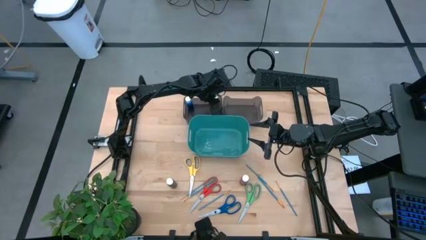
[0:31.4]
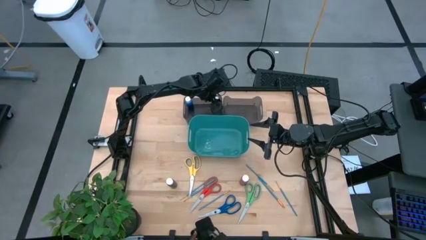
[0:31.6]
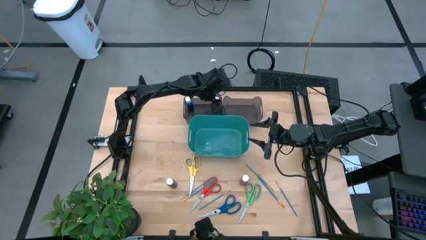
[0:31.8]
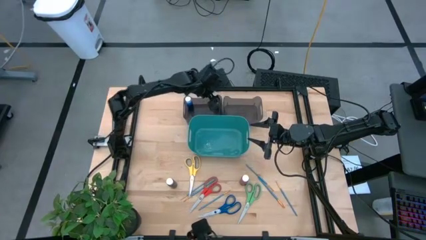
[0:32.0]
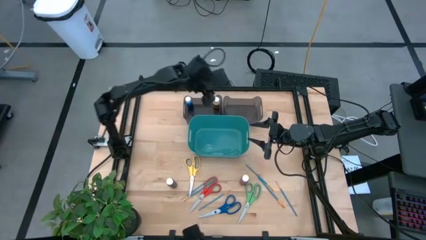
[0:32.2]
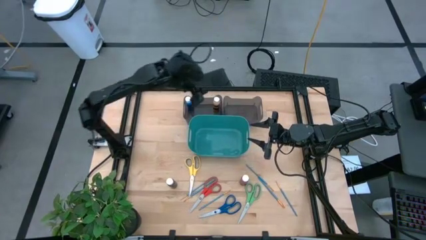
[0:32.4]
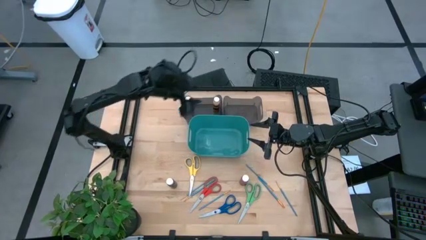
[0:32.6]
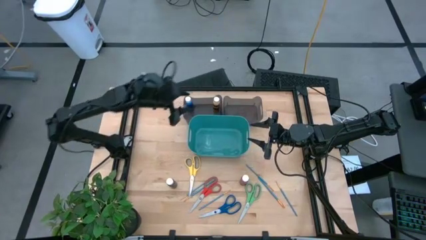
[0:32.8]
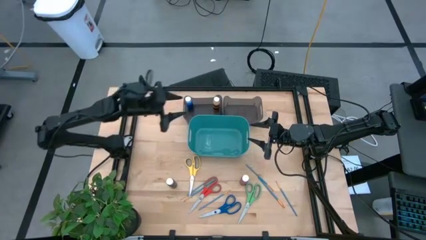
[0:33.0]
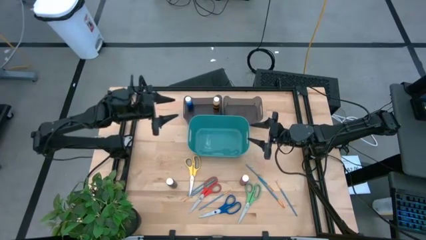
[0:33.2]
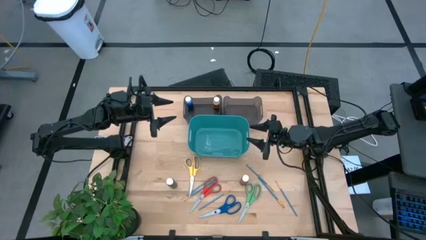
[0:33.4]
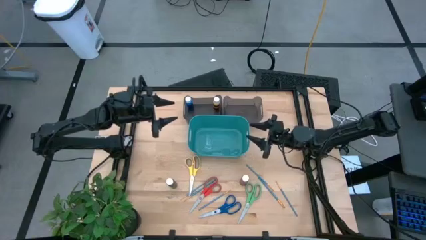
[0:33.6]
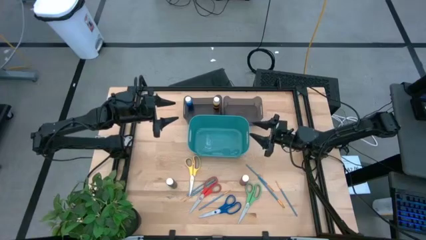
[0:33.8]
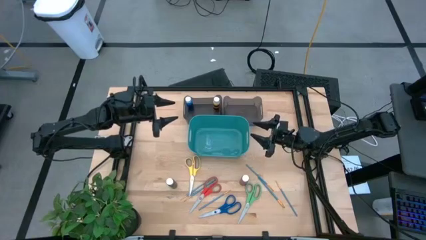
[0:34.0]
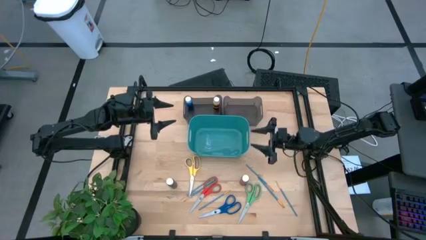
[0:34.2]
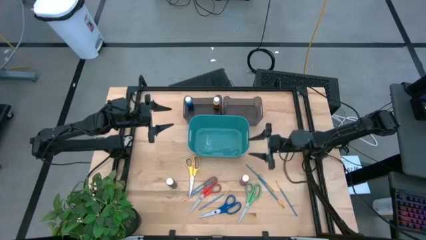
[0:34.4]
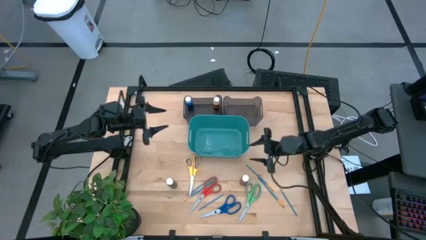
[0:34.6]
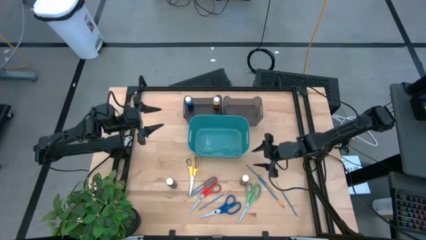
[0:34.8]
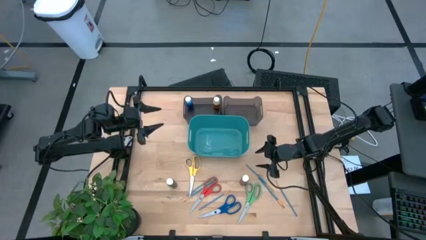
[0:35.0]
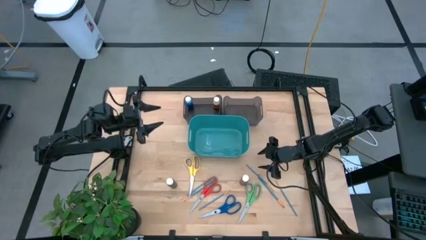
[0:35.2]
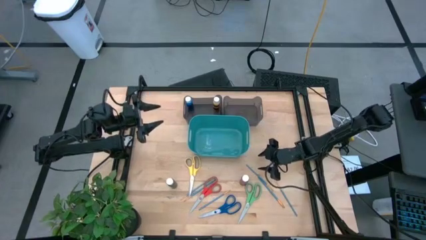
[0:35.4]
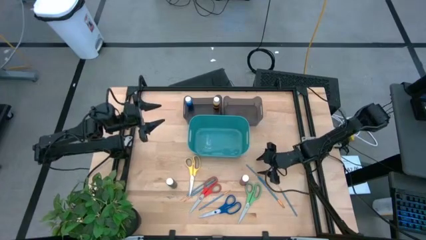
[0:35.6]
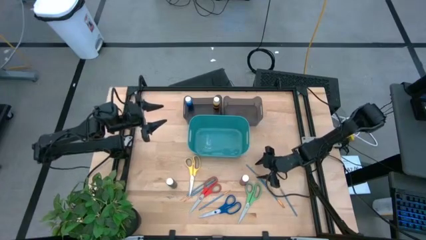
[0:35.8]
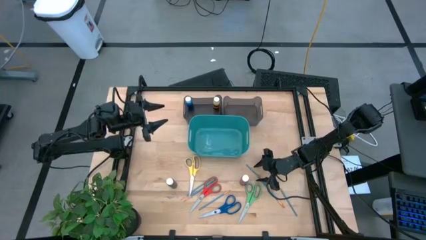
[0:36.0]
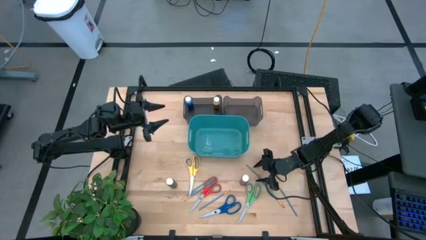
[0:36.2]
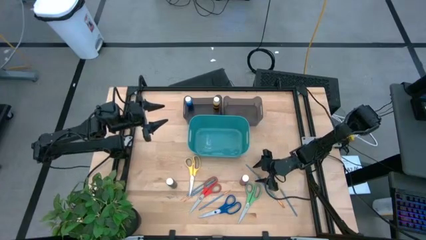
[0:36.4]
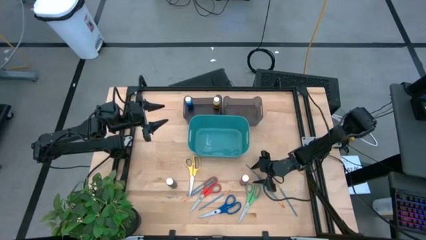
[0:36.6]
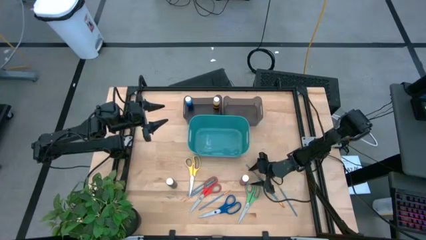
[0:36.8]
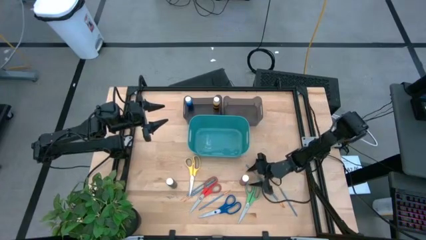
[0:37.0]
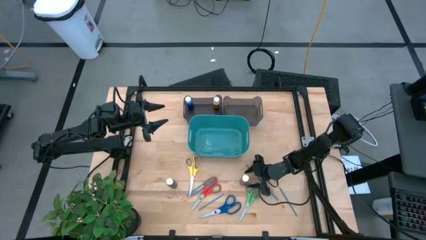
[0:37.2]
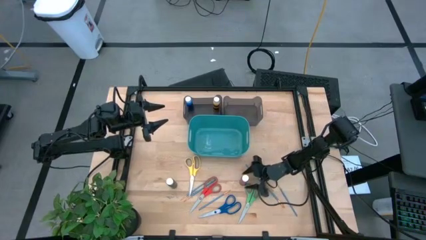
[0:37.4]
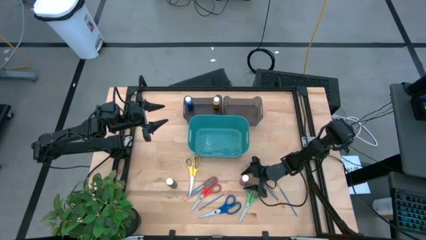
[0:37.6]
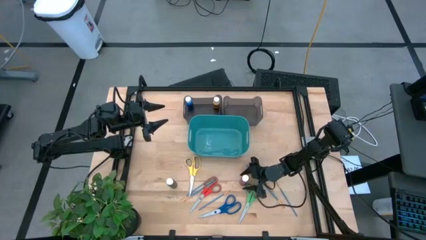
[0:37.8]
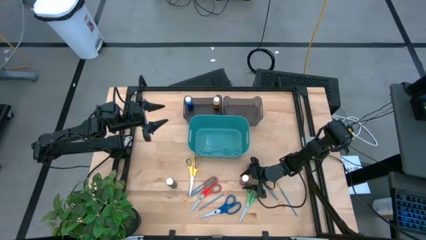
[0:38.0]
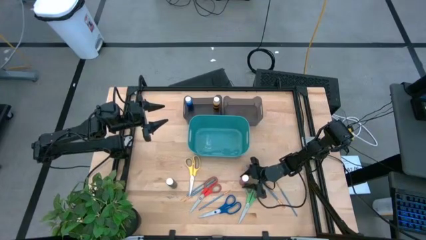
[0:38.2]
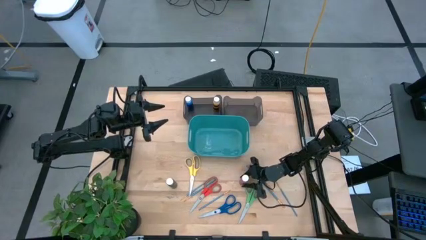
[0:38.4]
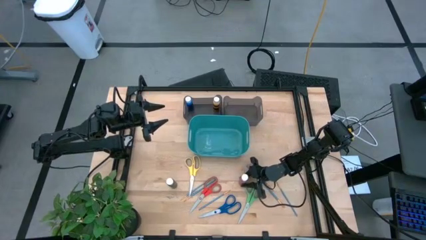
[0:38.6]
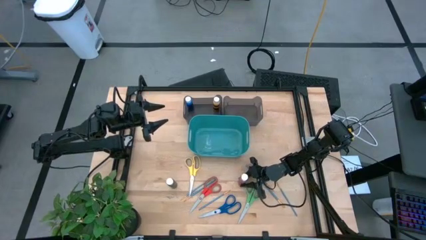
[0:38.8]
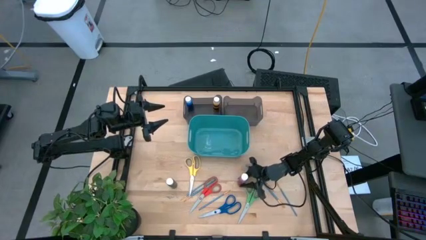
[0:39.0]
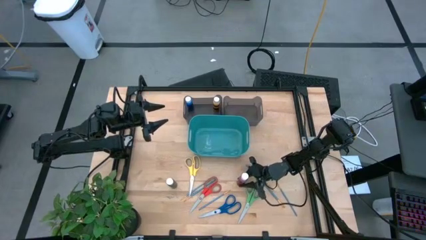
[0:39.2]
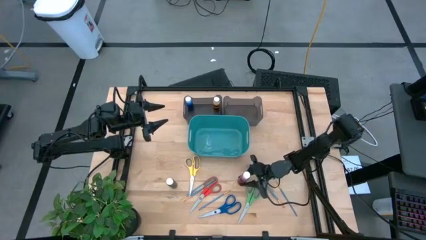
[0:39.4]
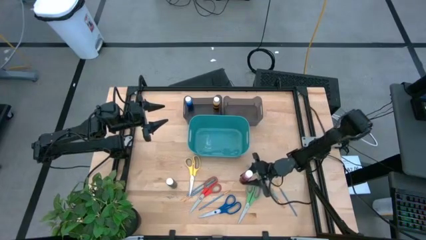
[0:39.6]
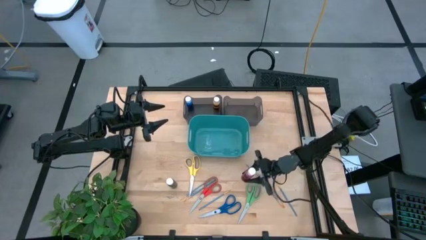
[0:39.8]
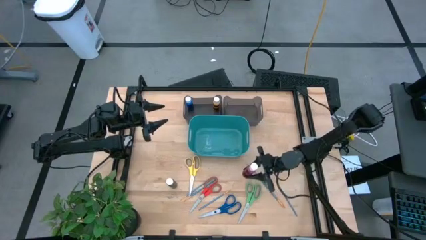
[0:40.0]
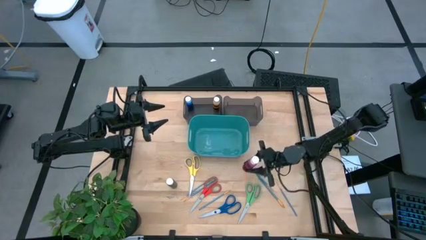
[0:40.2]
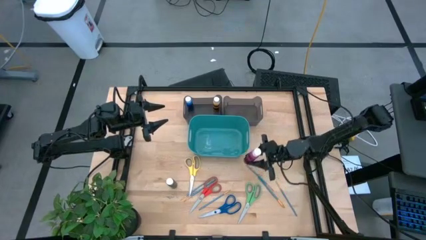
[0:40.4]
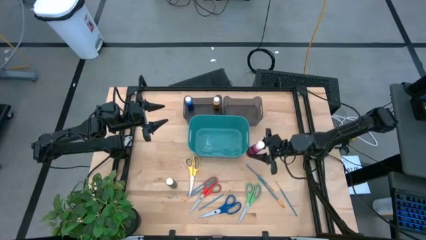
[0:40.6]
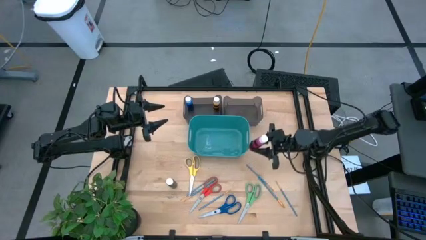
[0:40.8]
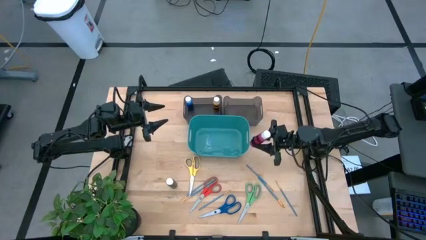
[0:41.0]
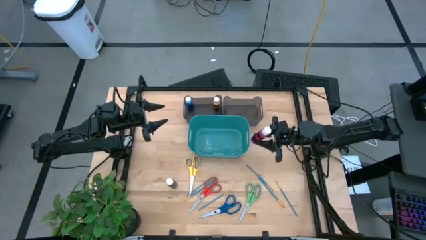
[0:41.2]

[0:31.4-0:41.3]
Task: Pick & Place Paint Supplies
Put the pink paint bottle into the left black bin

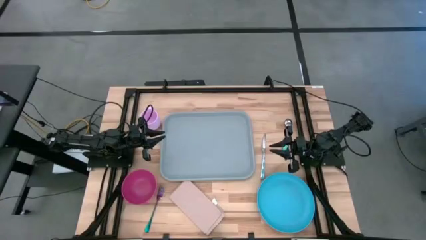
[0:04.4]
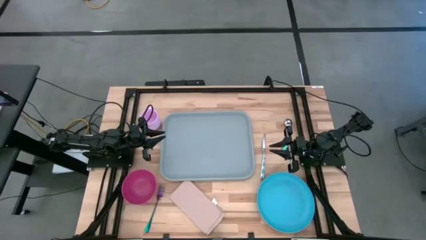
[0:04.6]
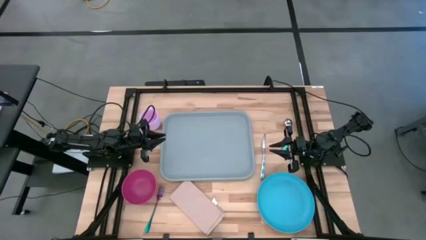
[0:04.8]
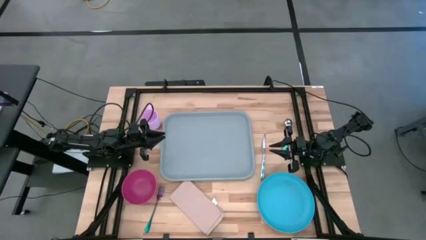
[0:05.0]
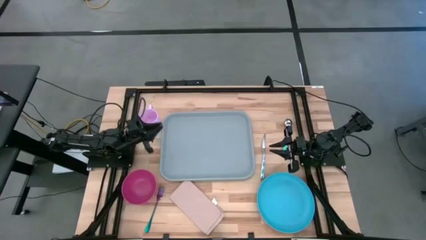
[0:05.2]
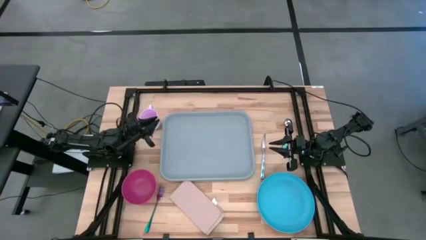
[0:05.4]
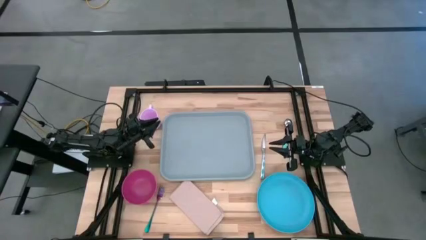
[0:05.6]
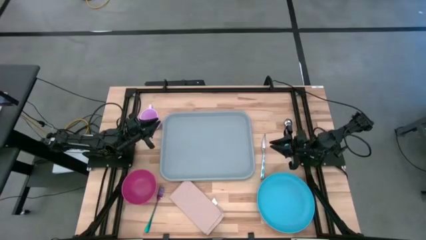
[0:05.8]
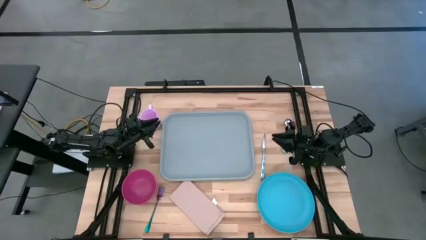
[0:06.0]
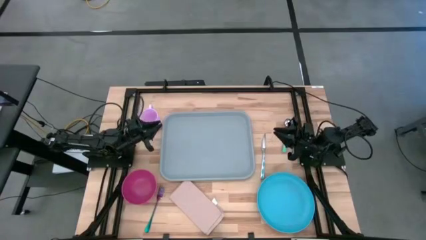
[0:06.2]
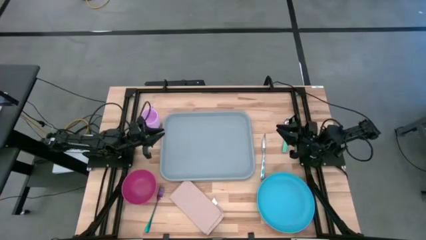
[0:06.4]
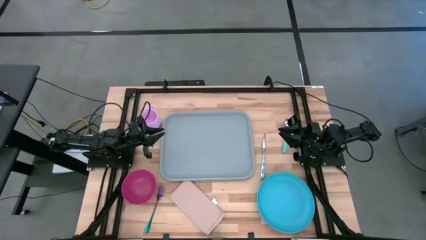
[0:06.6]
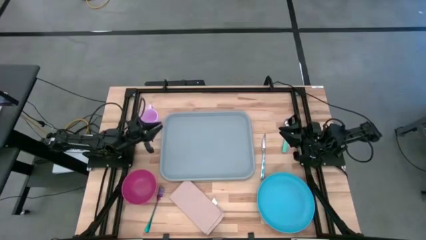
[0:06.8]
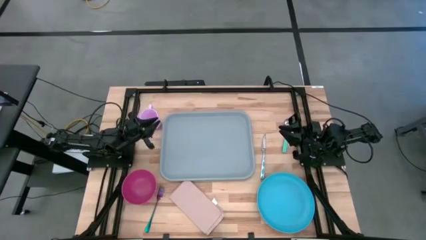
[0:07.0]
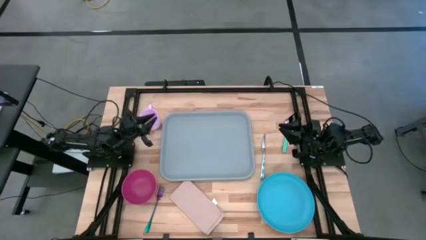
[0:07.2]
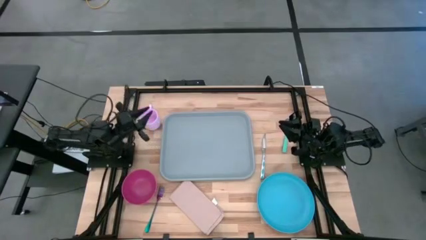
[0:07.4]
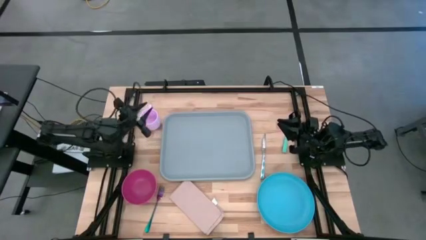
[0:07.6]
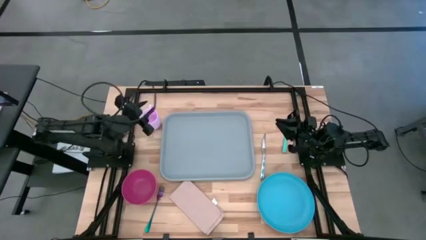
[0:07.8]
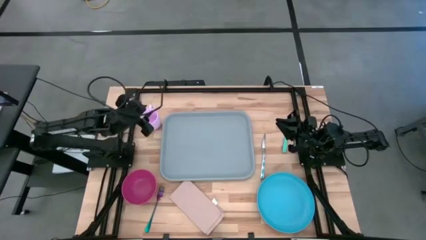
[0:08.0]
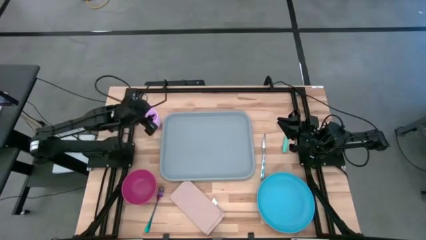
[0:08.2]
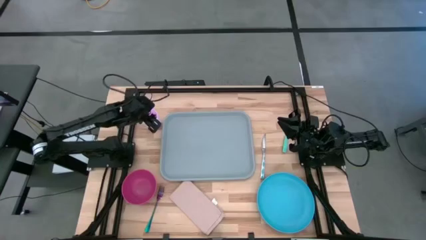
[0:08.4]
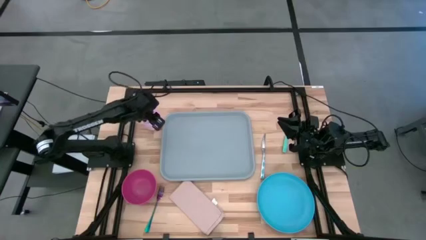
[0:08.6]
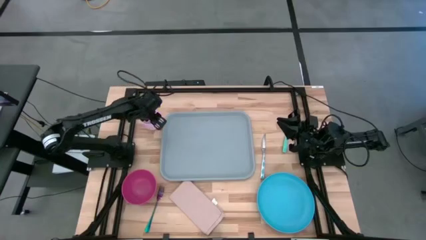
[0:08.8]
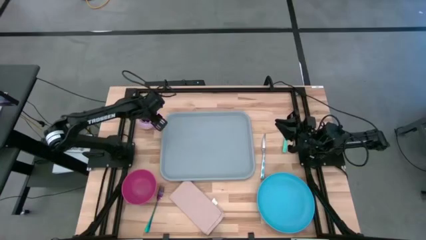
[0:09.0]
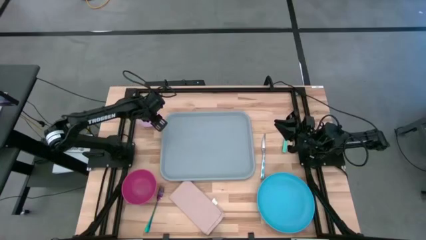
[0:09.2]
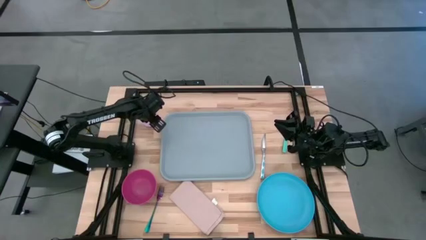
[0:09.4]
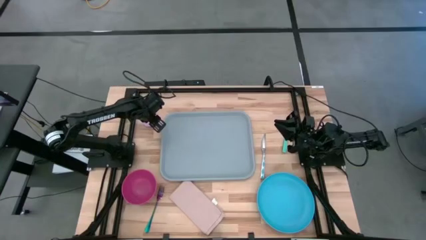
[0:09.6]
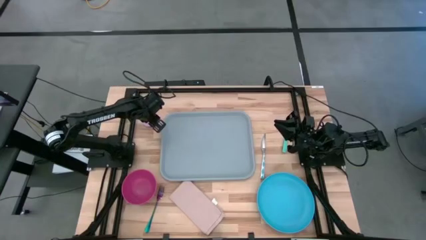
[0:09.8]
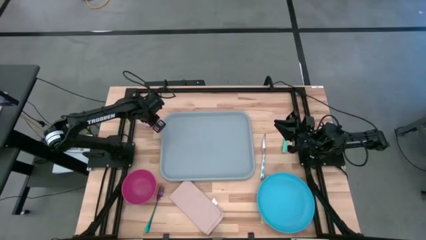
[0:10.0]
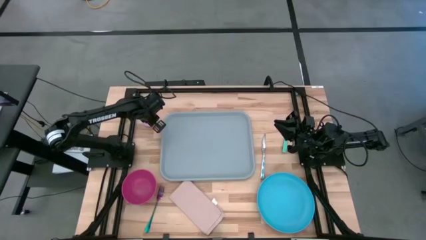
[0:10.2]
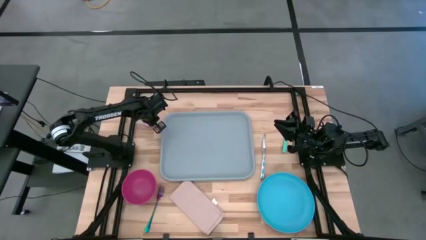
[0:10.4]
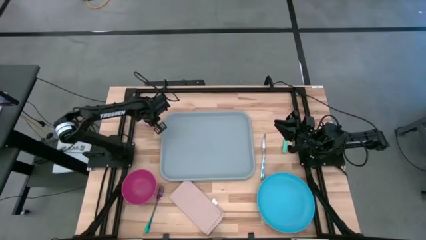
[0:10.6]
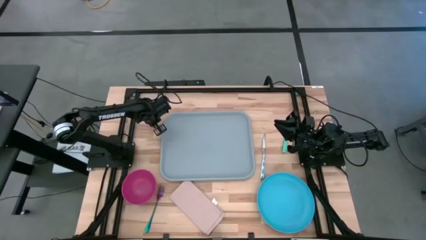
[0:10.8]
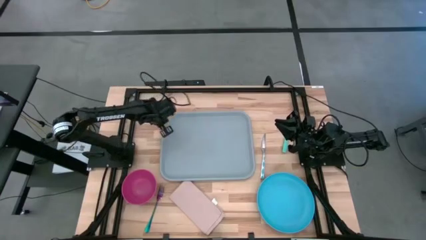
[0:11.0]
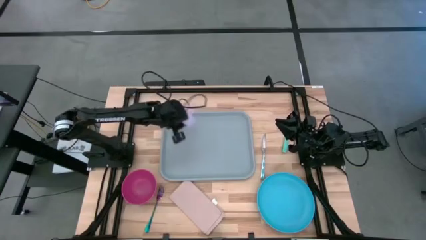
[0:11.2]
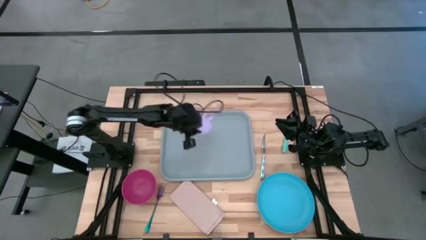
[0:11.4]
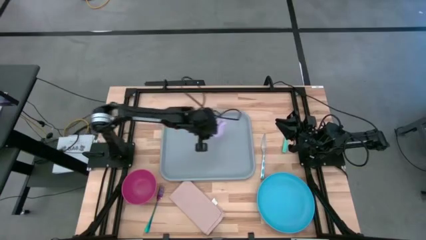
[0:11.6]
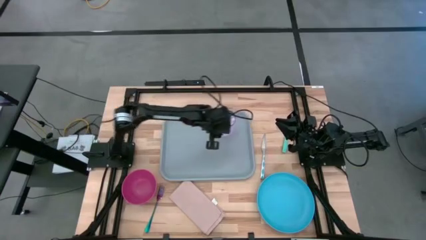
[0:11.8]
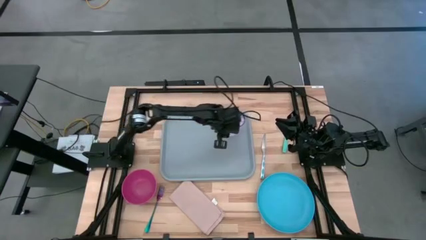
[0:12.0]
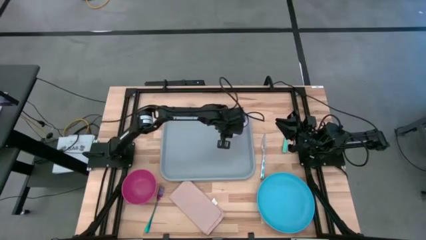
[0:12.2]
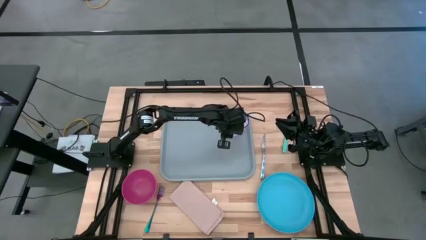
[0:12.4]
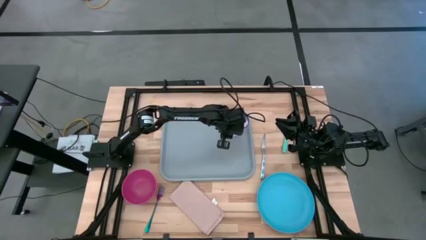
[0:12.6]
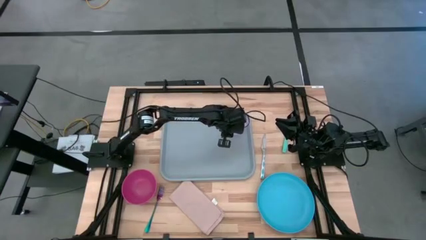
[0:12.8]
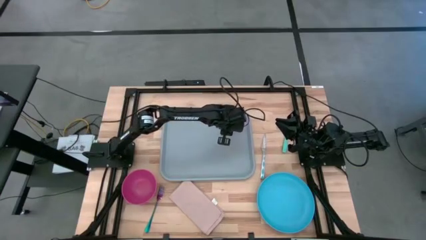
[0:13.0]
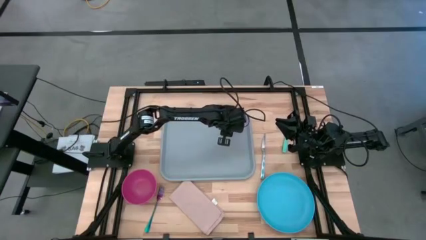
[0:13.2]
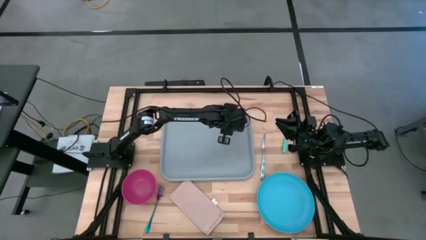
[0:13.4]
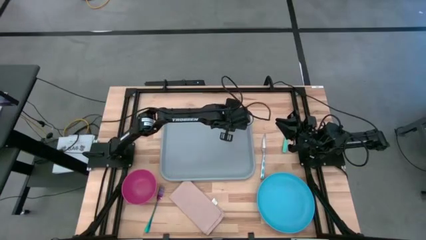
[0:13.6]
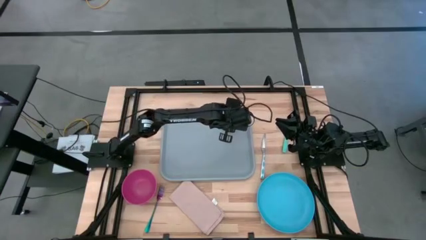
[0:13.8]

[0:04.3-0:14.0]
Task: Set up tray
Put the pink mug on the gray tray at the top right
